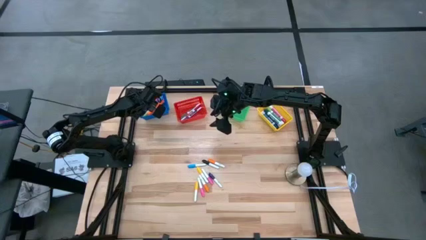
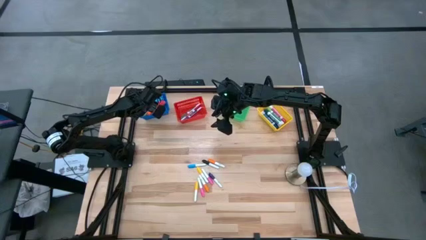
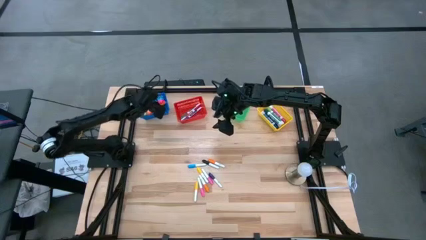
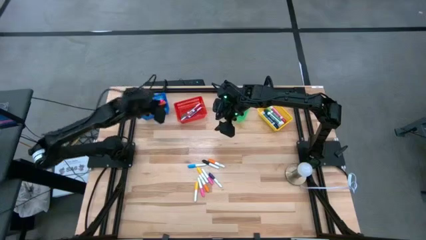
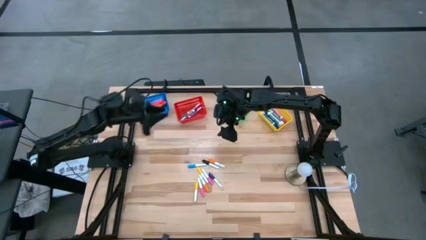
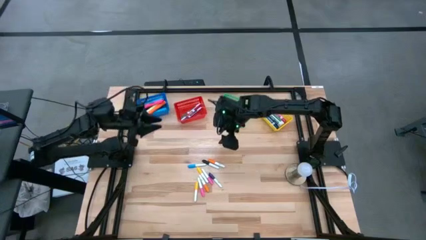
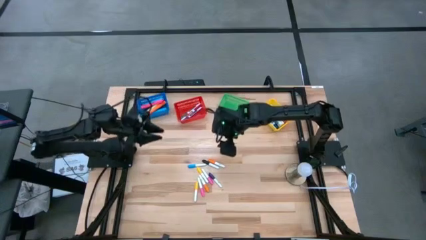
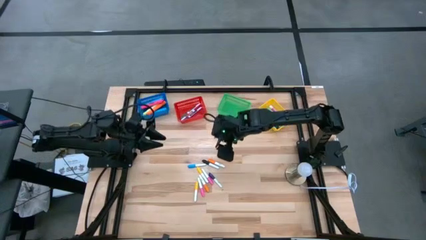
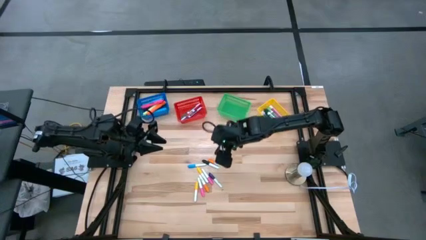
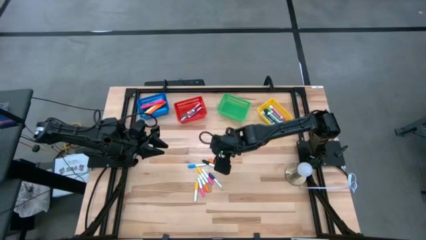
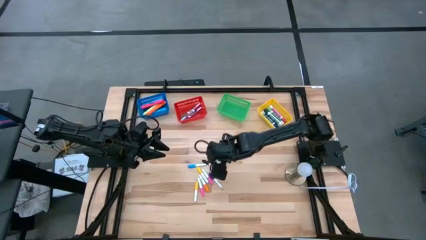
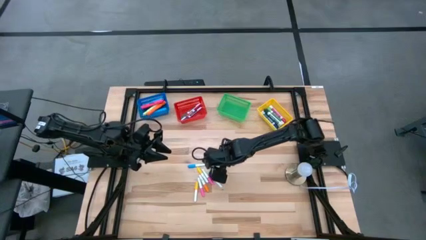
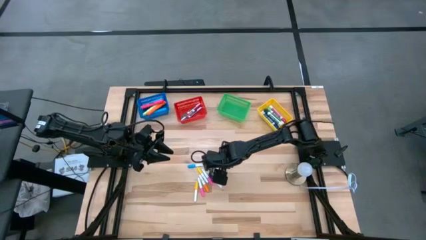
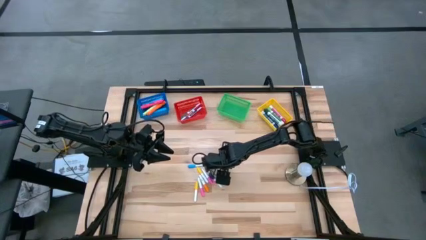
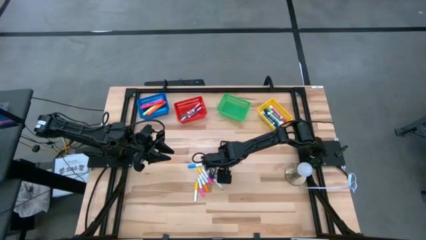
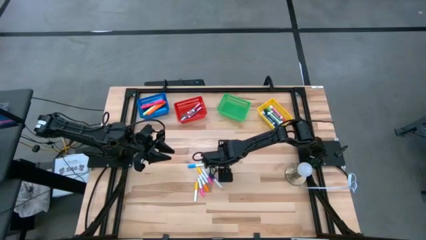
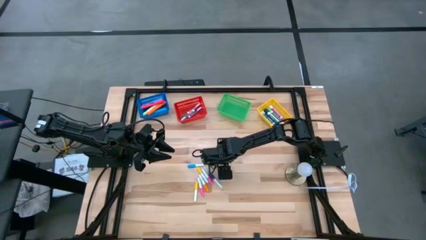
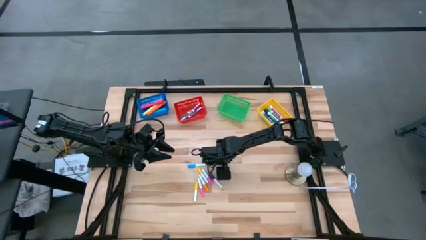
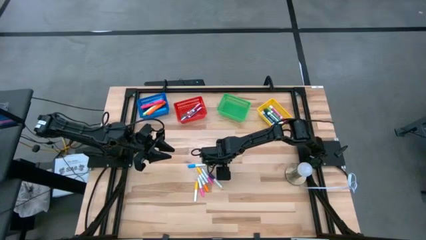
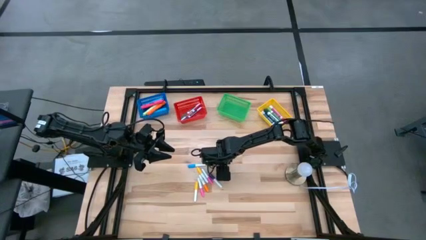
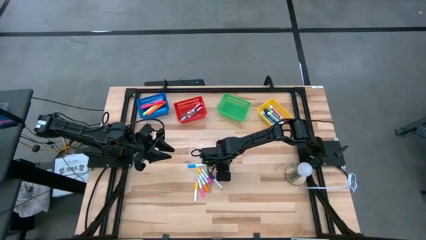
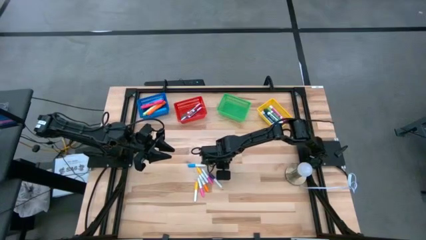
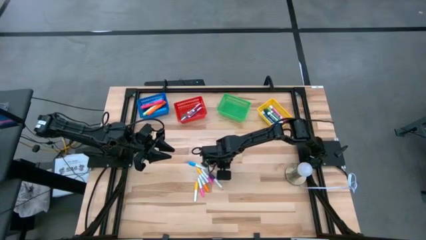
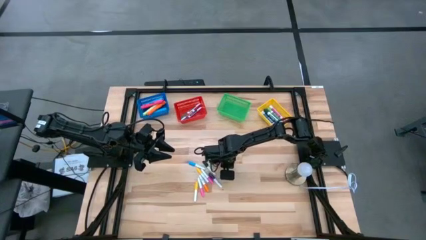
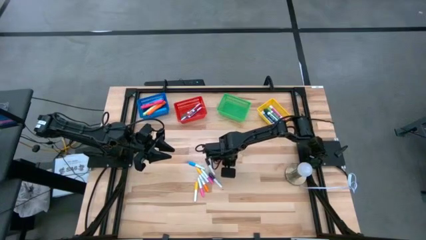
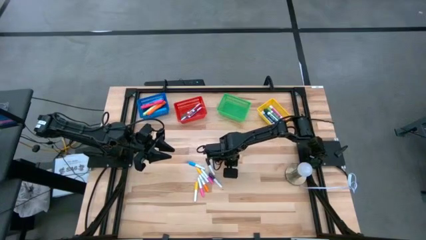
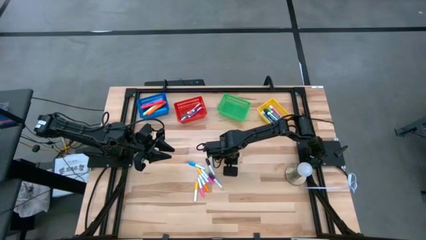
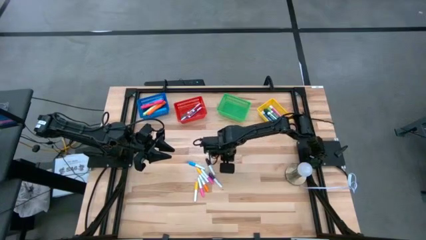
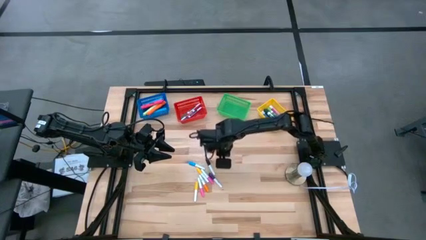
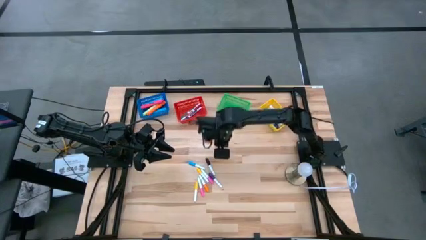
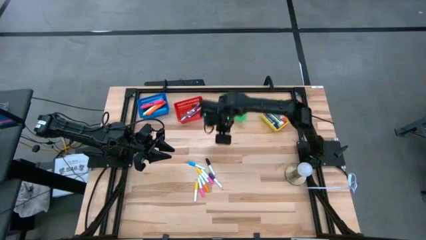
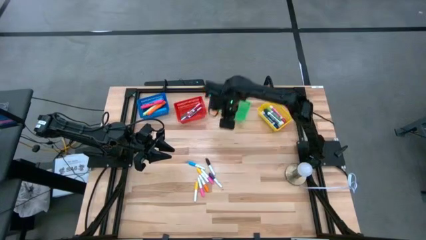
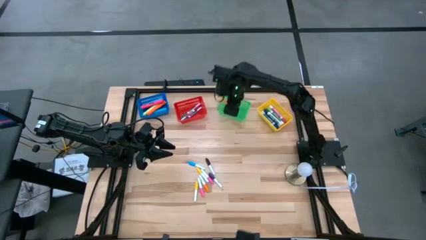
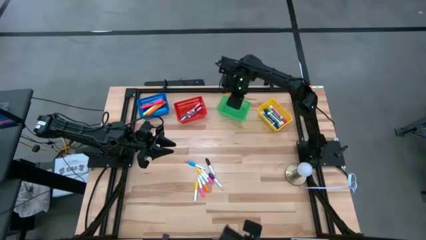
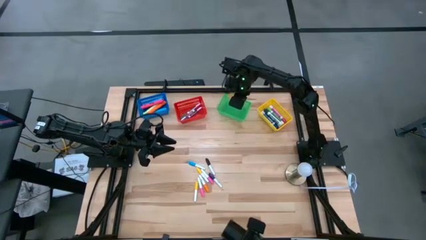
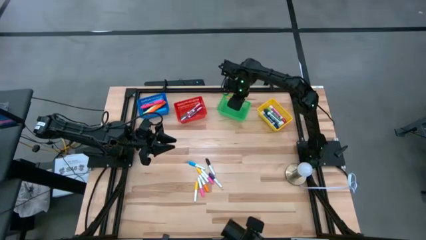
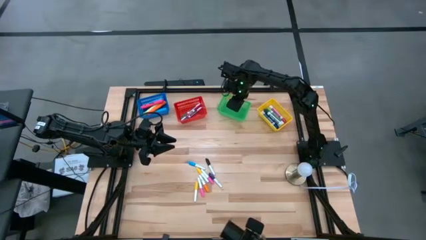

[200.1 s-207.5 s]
Task: Pick & Place Markers
Put the top small orange highlighter pen into the green bin

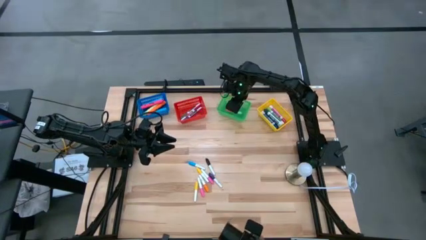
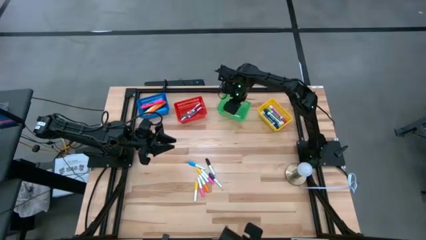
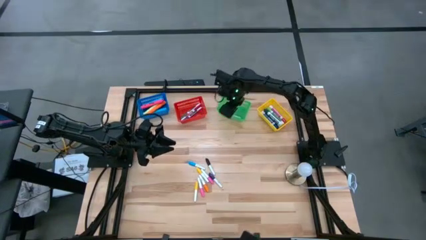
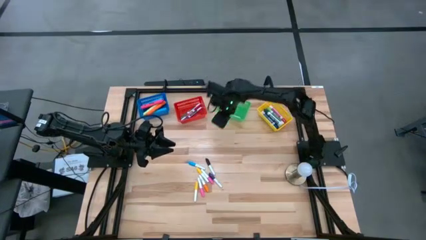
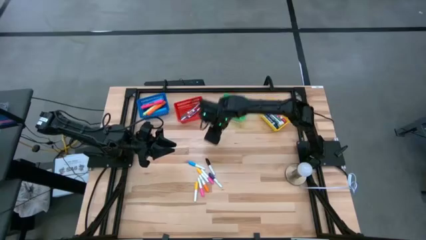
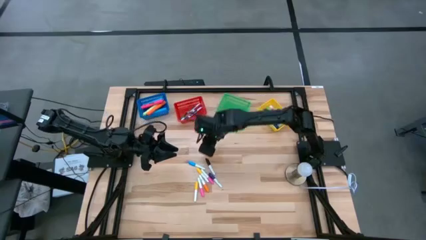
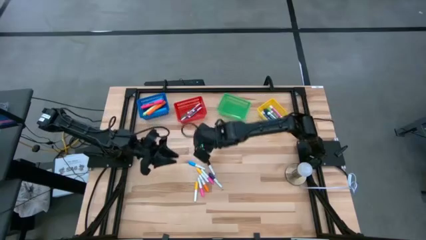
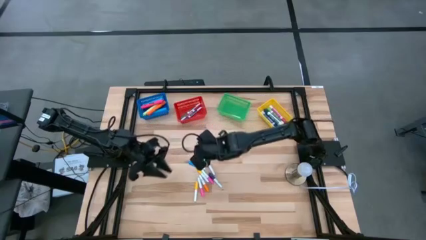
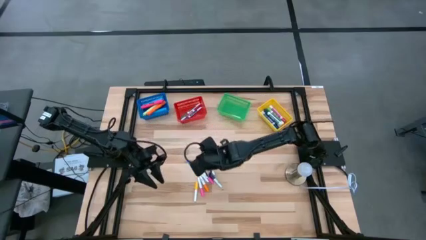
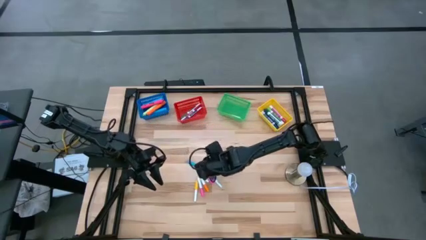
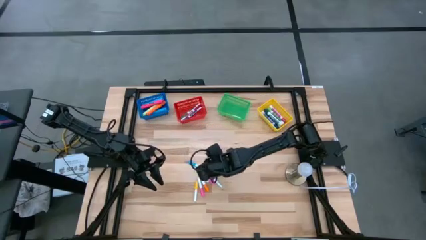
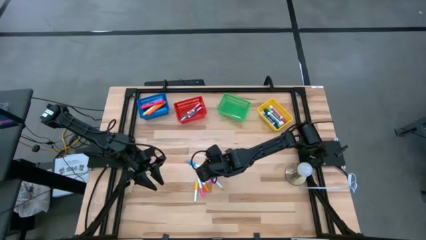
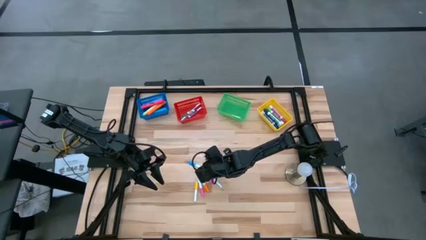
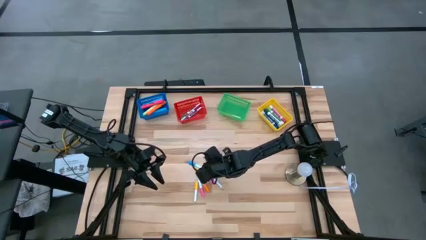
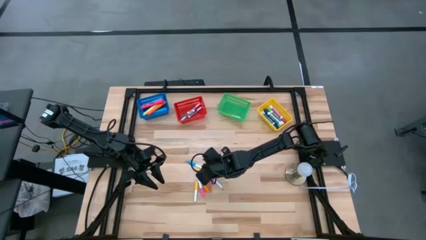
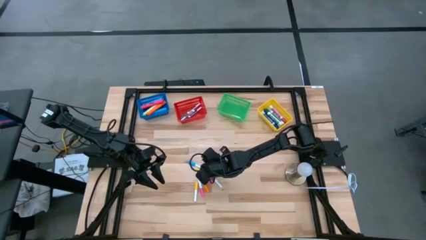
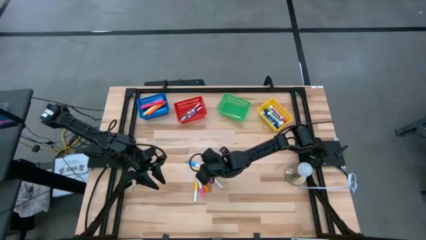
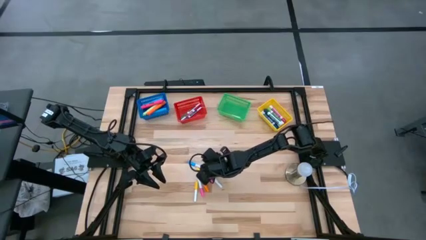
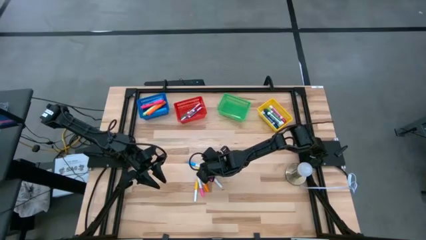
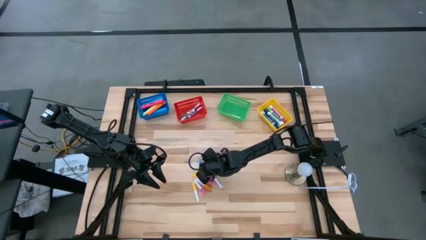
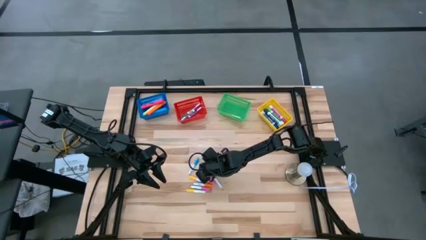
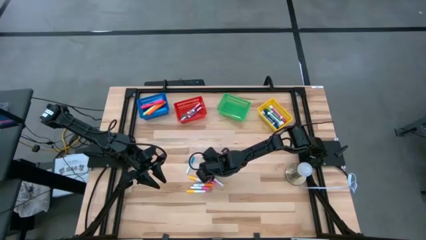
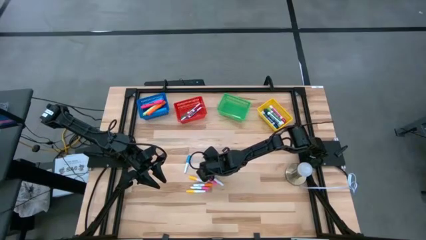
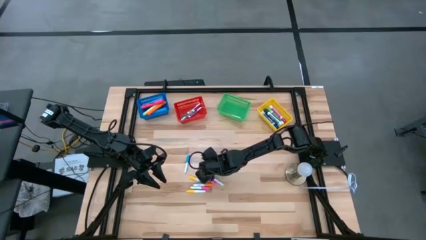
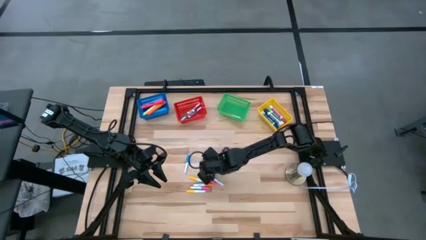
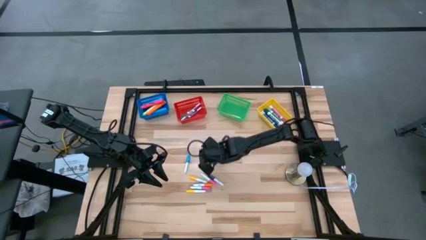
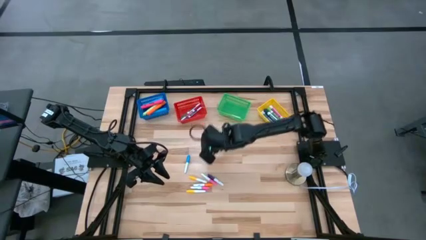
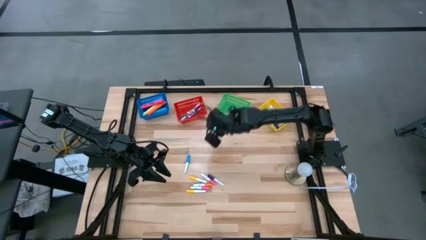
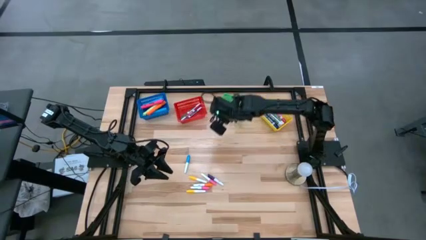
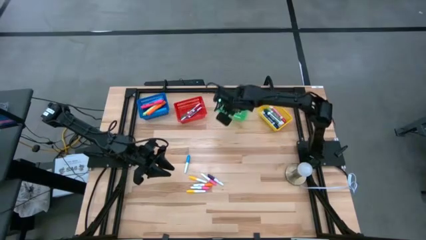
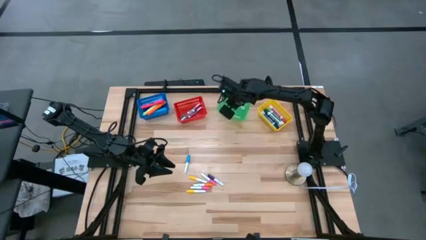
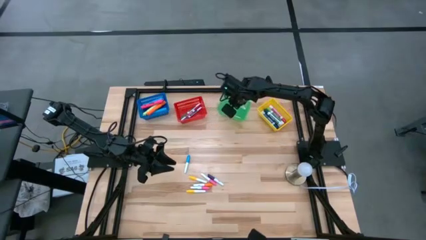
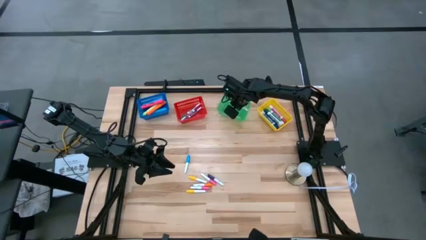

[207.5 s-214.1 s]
Put the small black highlighter pen into the green bin

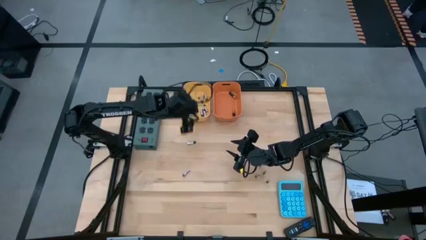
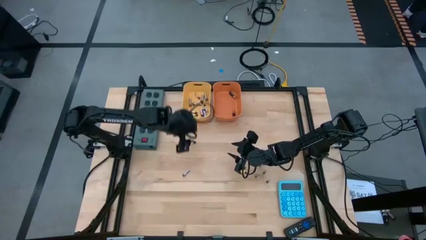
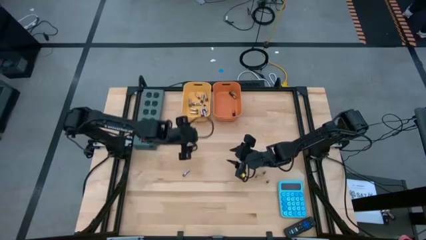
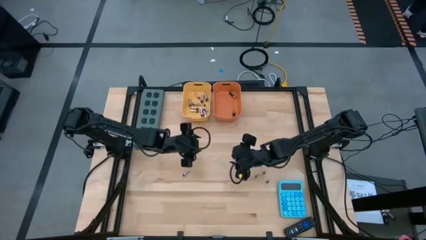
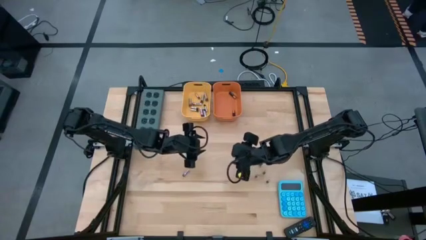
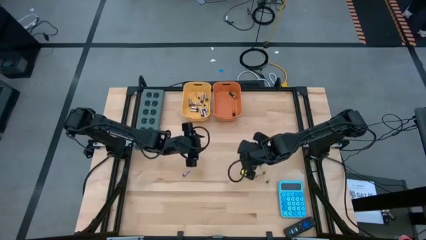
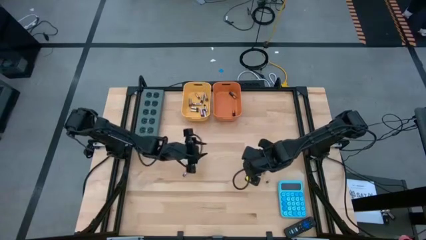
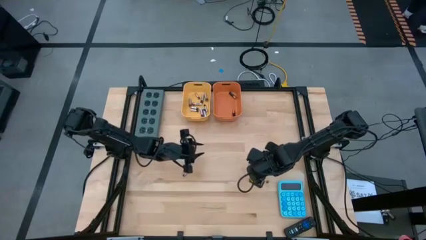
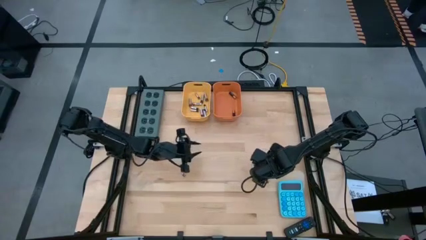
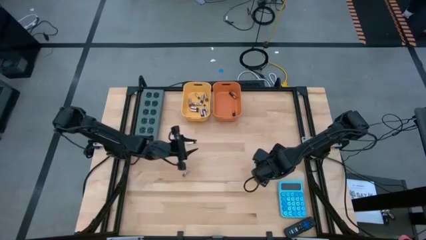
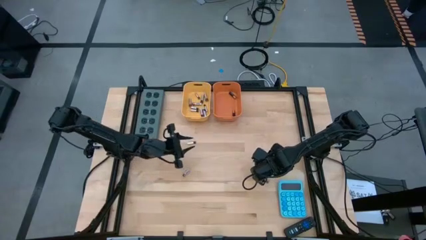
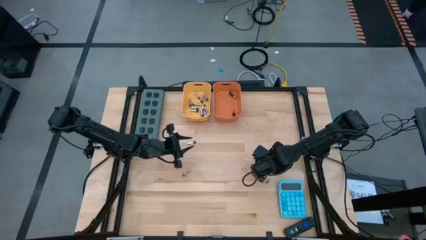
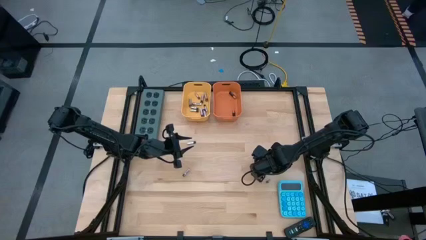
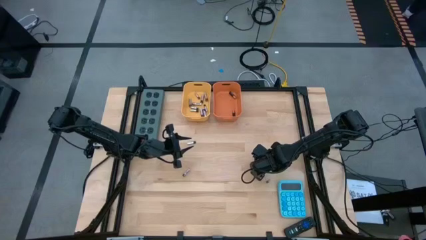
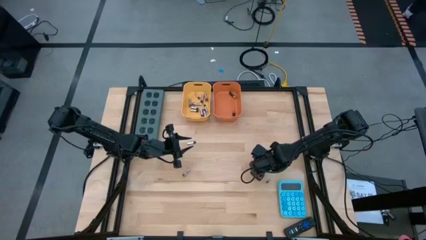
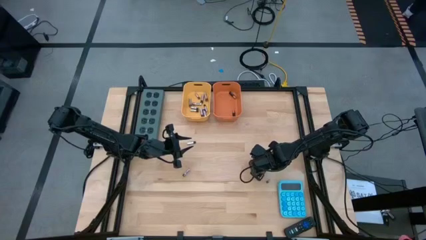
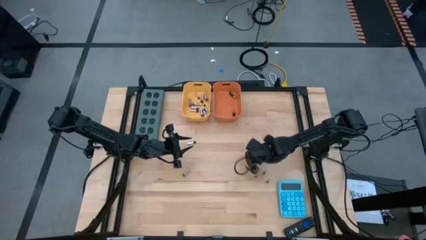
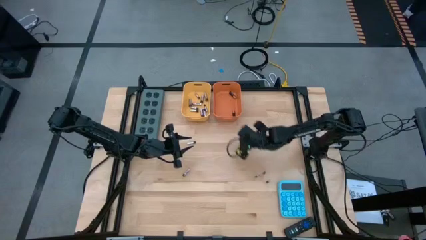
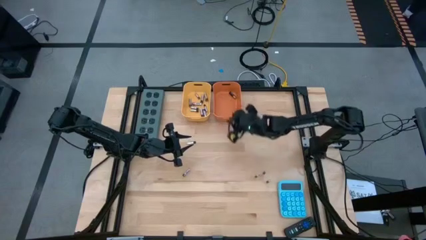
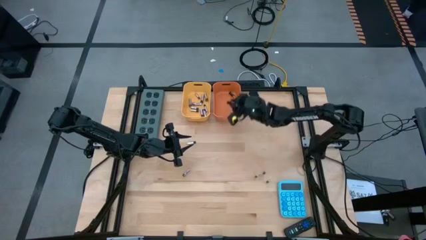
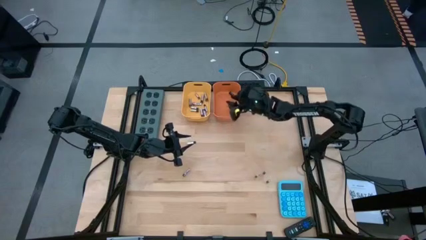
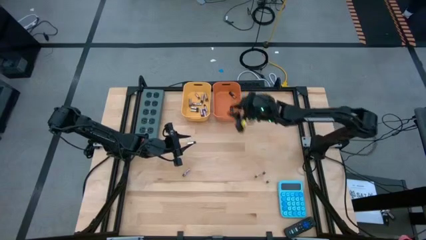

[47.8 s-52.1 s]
Task: Sort batteries
Put the black battery into the orange bin
